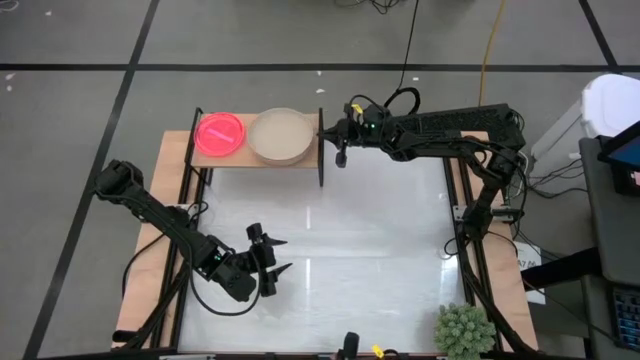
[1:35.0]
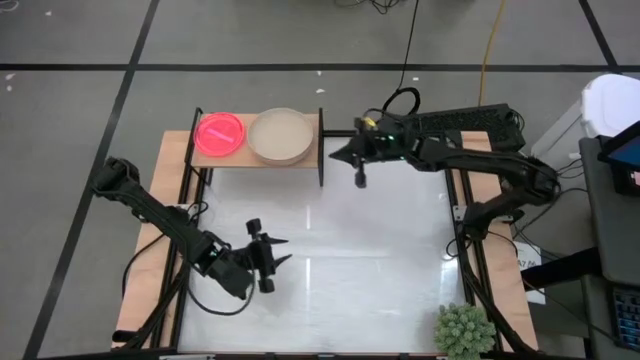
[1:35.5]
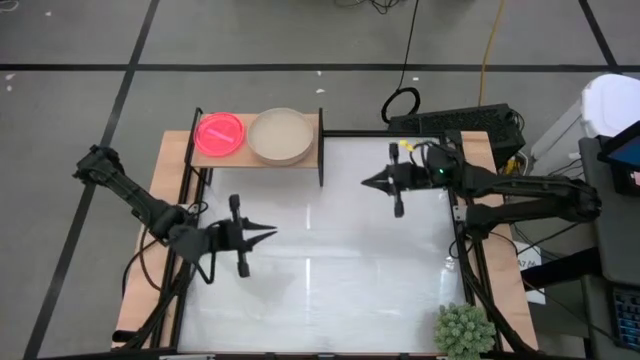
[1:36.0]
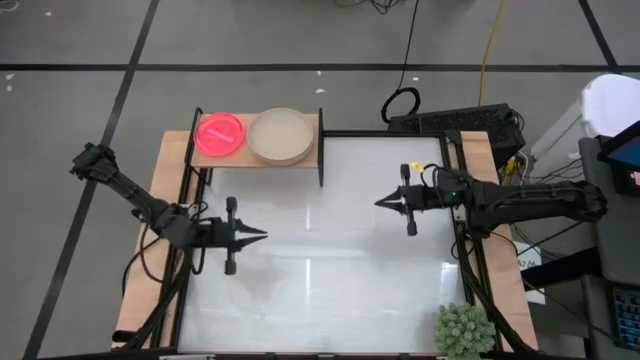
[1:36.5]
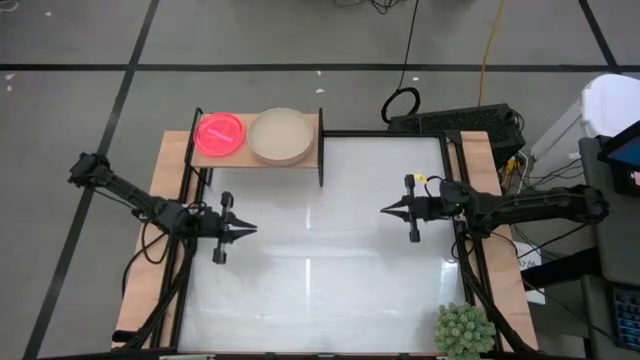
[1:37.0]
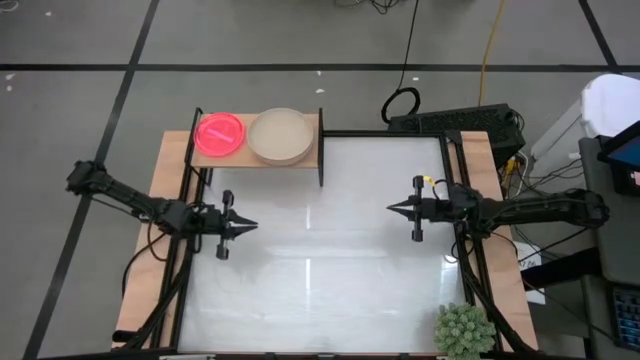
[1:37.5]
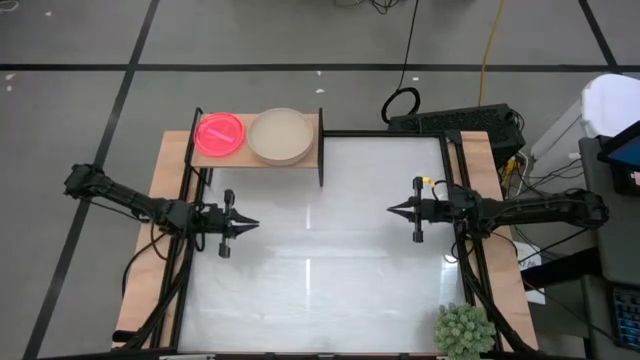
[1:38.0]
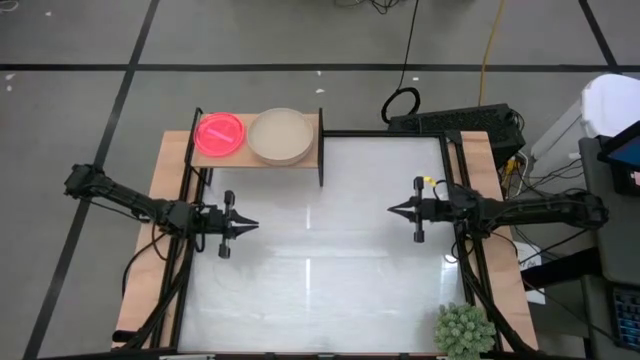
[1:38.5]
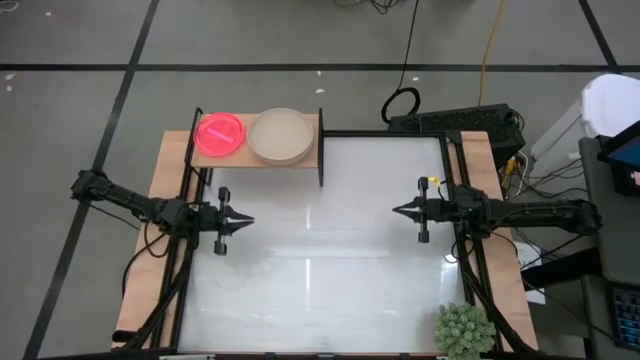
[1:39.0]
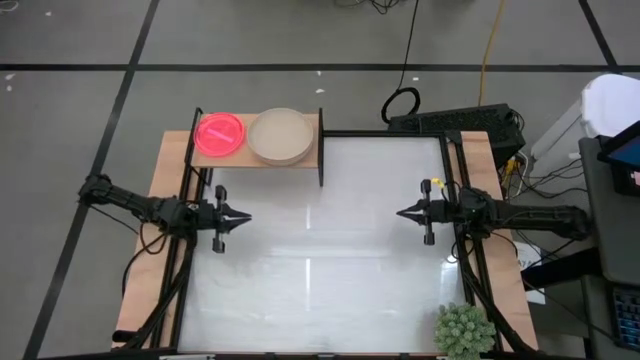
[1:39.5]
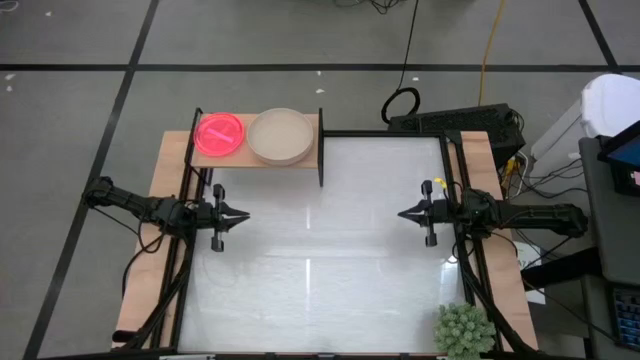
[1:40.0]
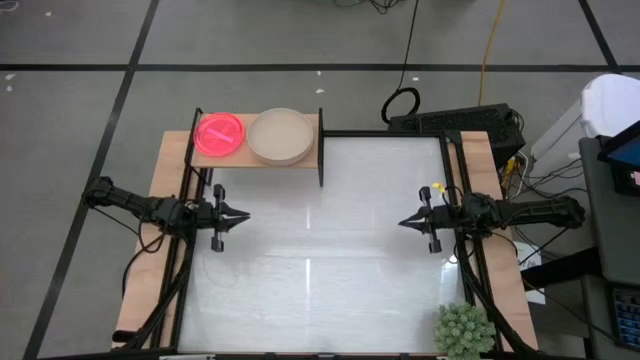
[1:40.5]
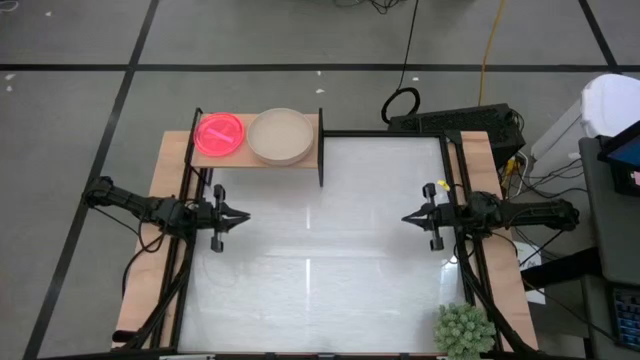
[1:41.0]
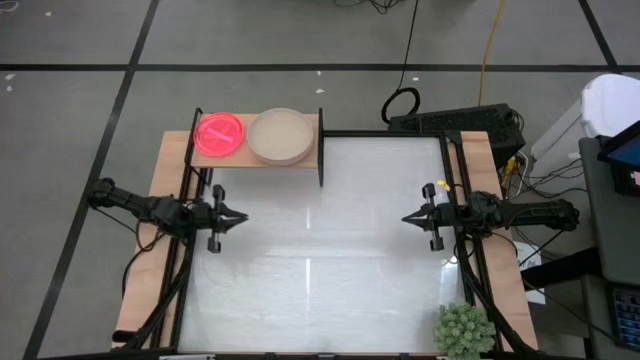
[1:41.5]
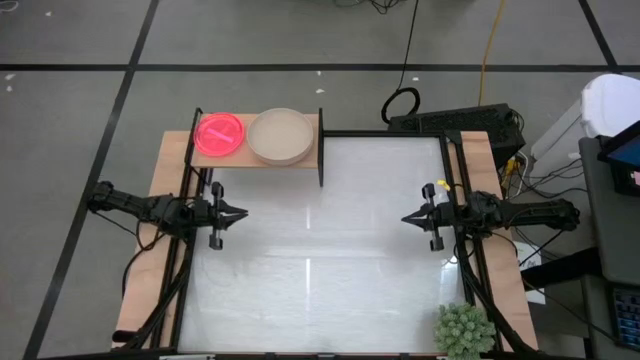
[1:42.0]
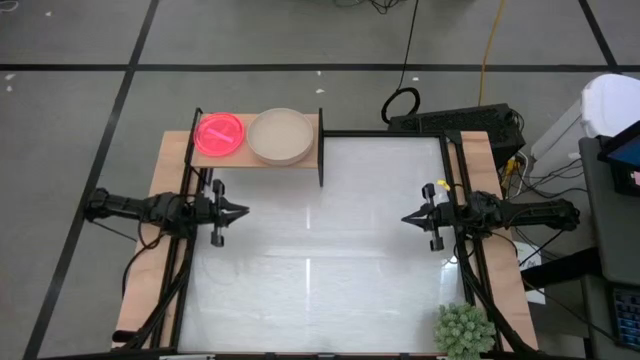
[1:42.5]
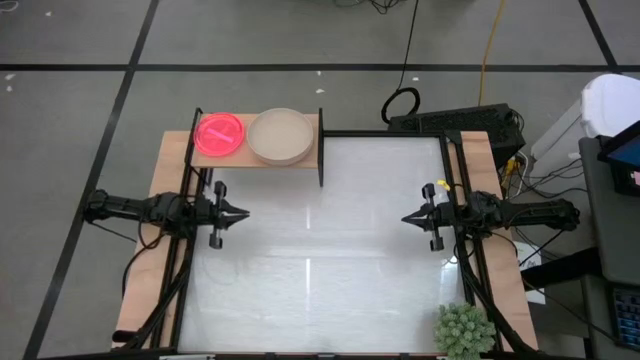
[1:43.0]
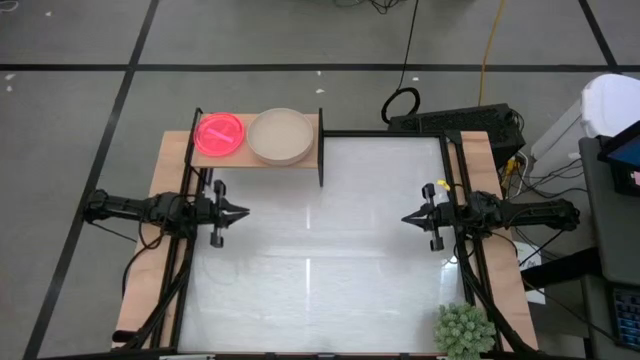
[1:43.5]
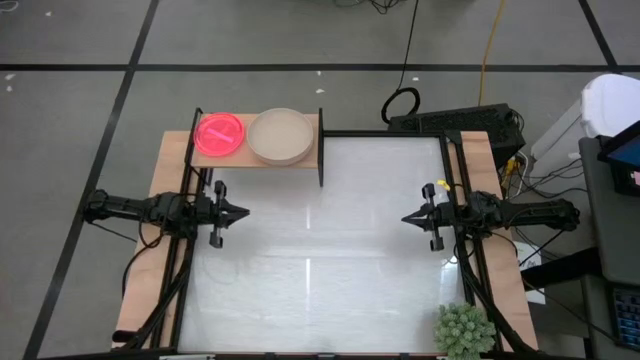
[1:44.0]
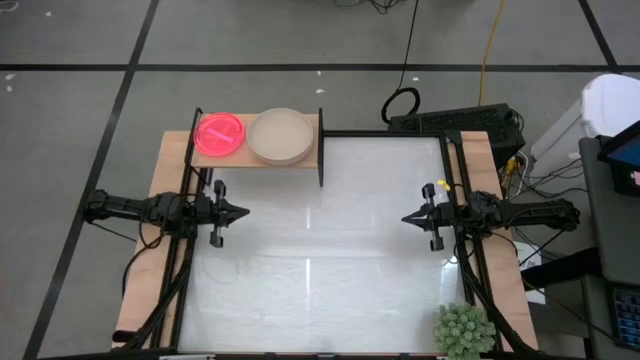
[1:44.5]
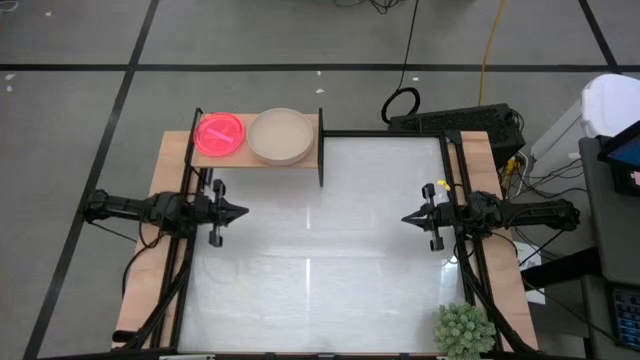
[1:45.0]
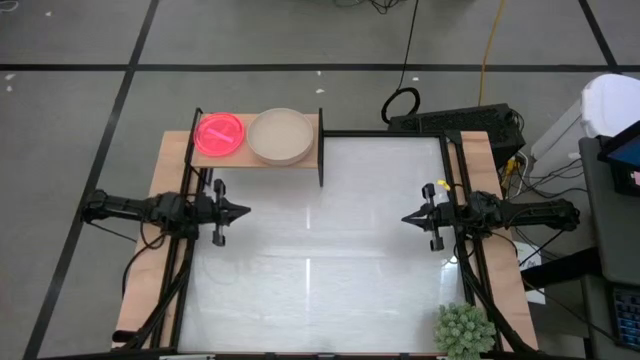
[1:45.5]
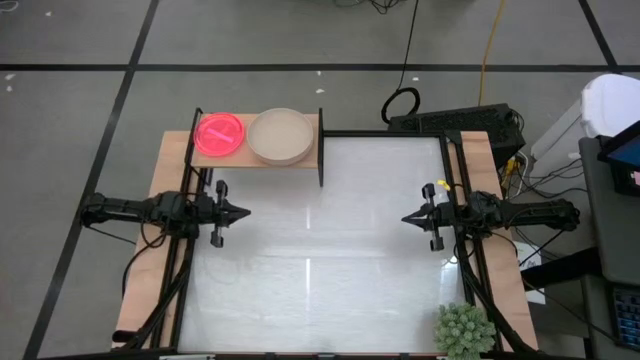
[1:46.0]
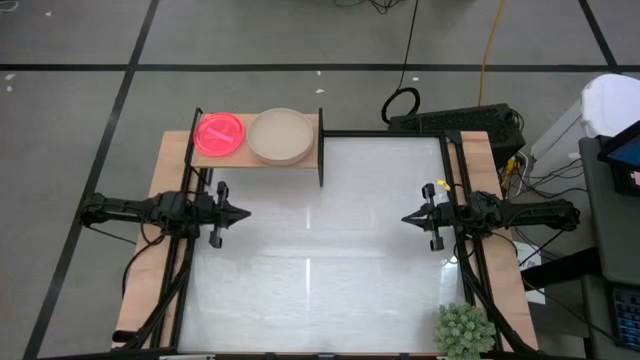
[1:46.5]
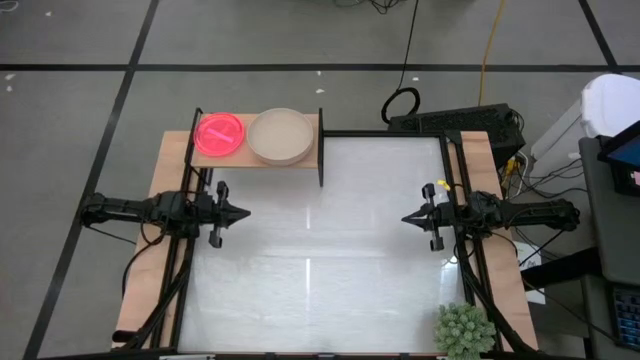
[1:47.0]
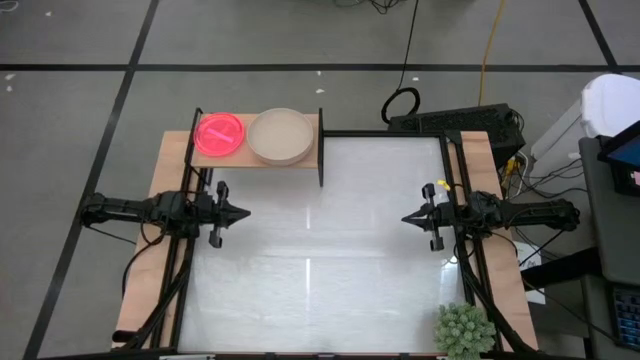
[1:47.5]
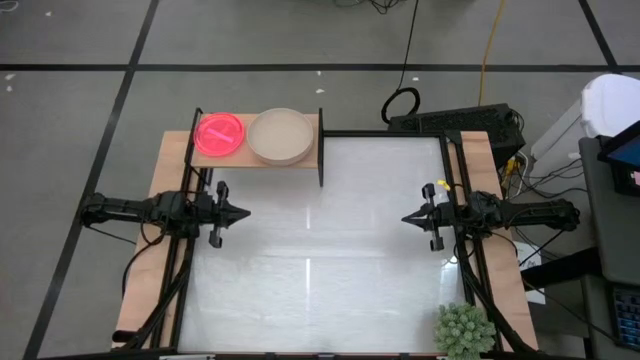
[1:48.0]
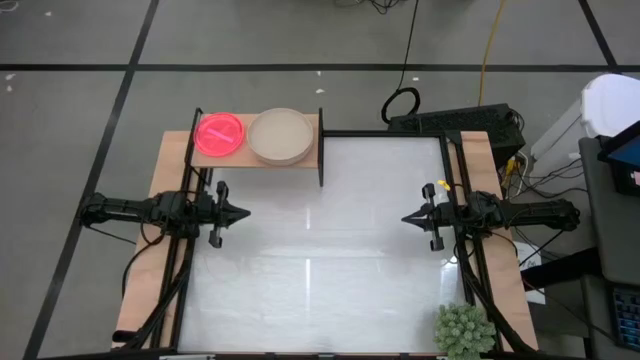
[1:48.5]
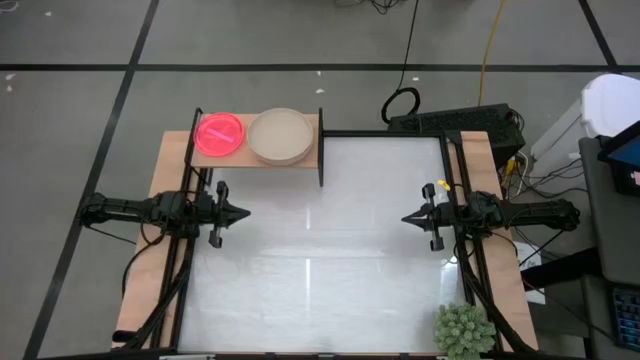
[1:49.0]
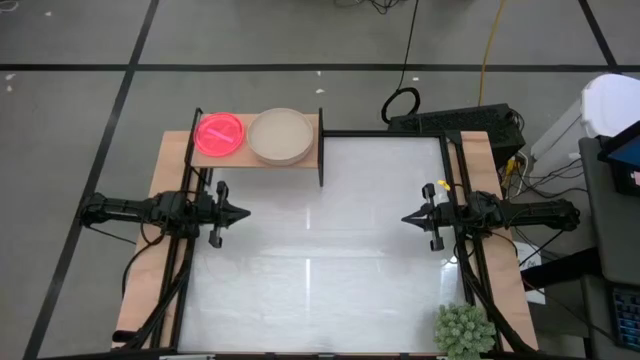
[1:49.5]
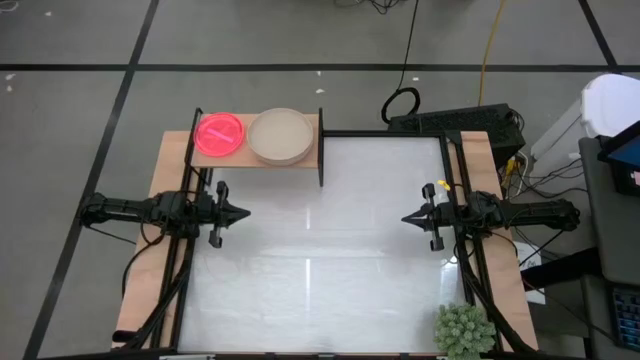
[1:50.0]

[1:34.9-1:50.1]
Task: Place and stack plates onto a shelf
Return to Home Position

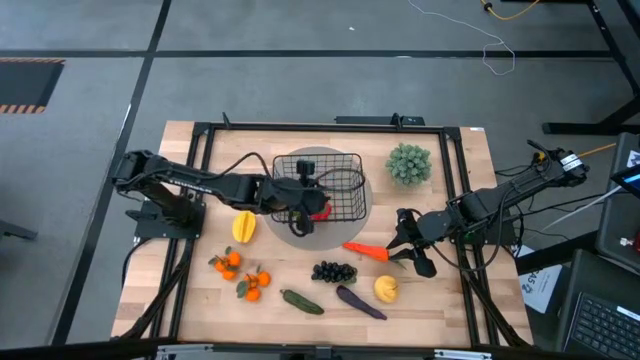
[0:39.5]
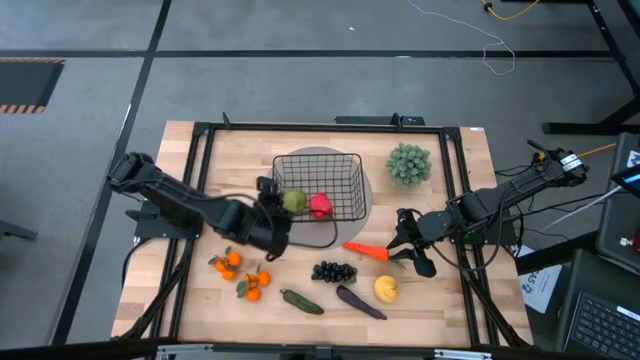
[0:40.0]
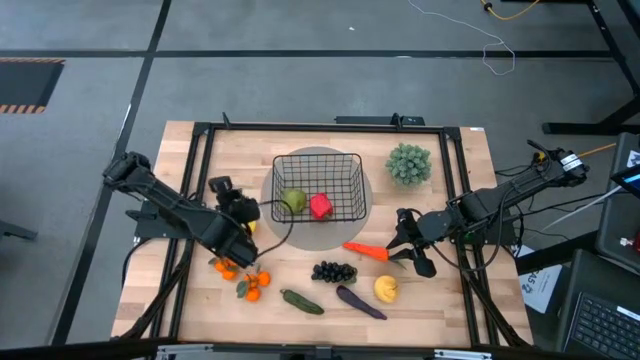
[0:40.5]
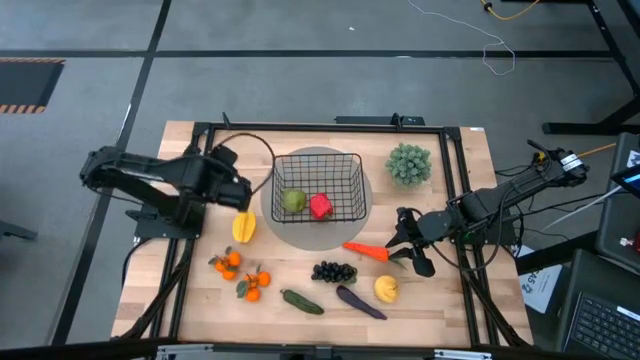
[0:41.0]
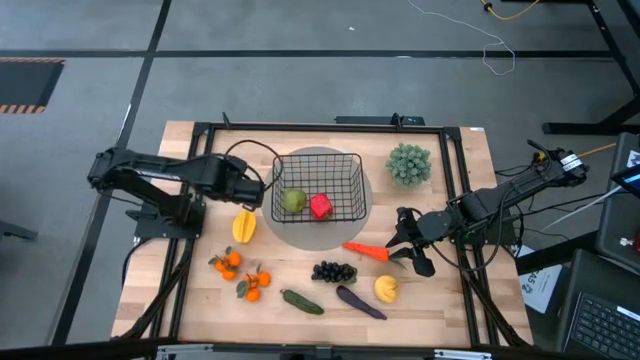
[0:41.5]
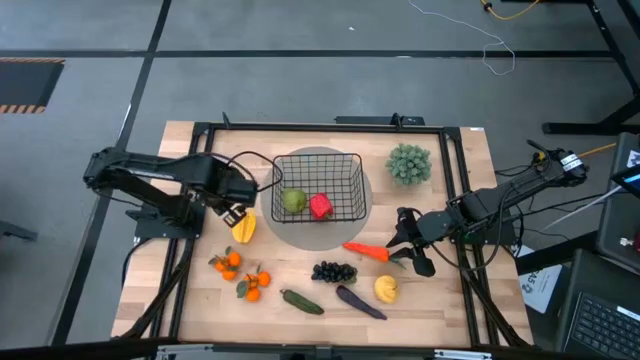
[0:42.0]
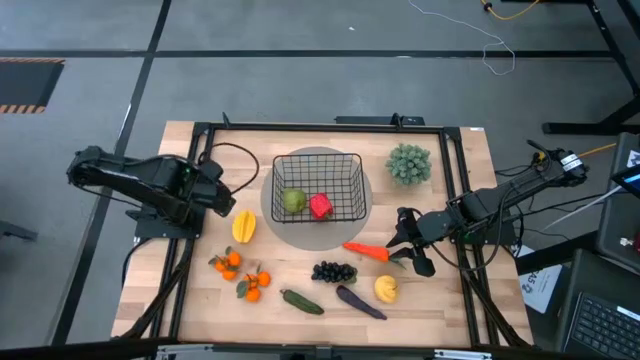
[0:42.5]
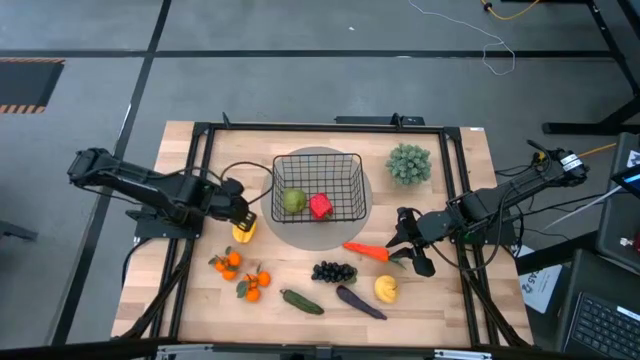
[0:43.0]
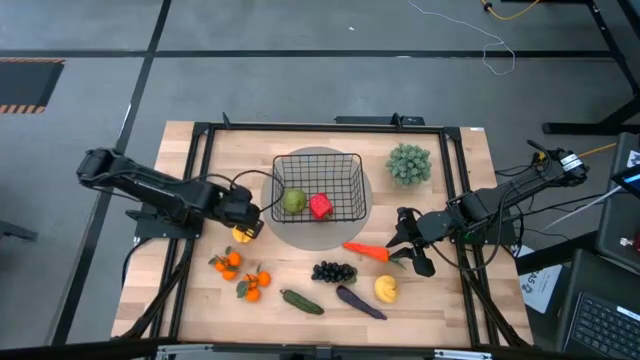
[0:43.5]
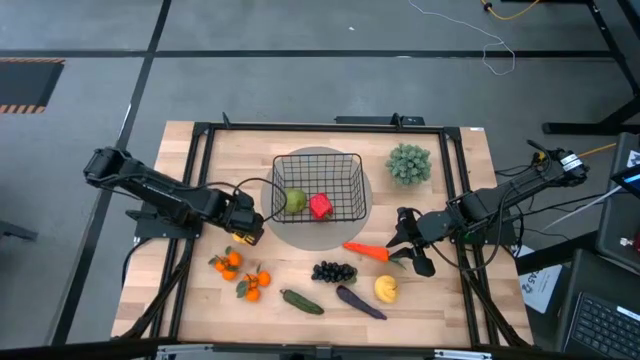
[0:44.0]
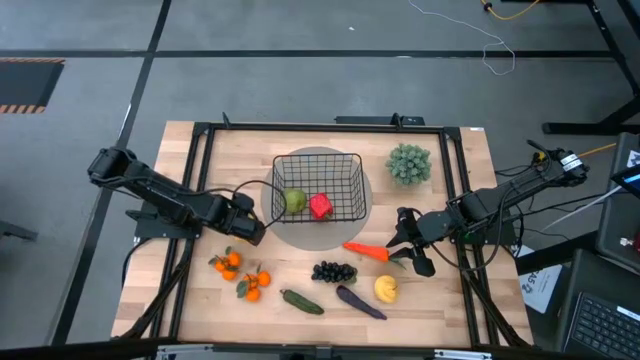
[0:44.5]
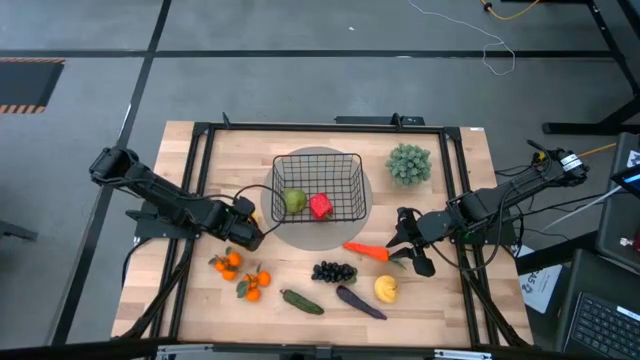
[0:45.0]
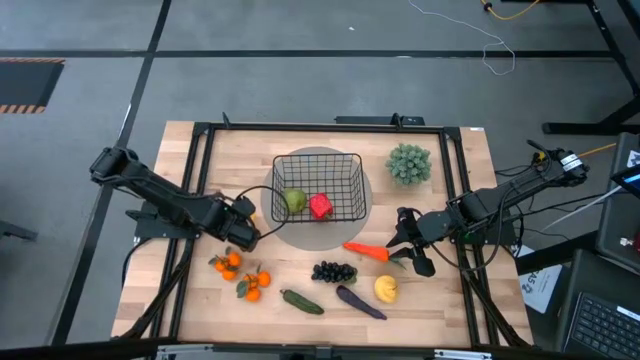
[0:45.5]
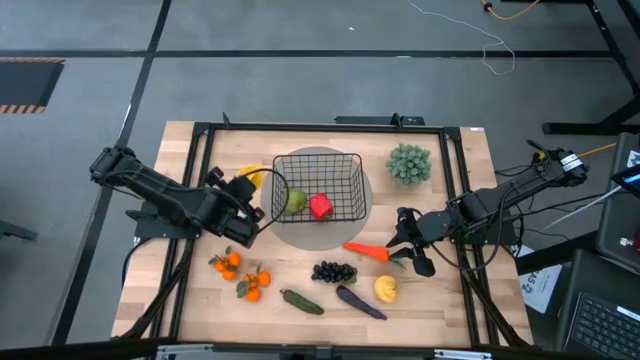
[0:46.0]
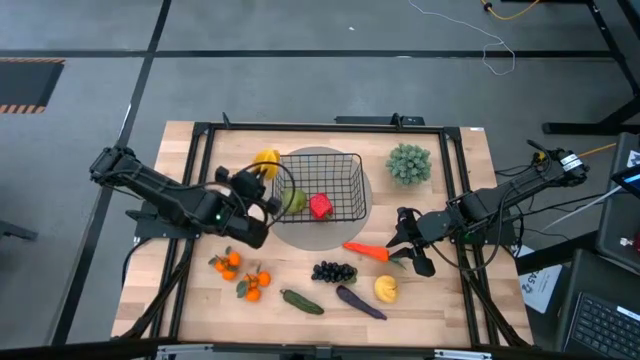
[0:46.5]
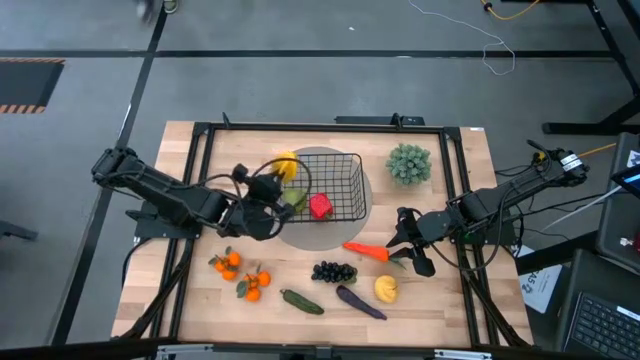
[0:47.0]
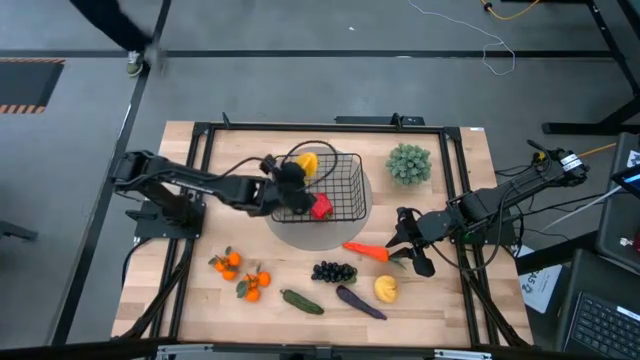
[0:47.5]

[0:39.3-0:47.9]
Task: Build produce basket
Put the yellow starfruit into the black wire basket
